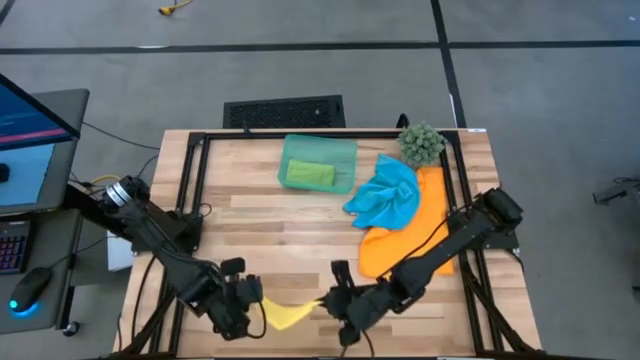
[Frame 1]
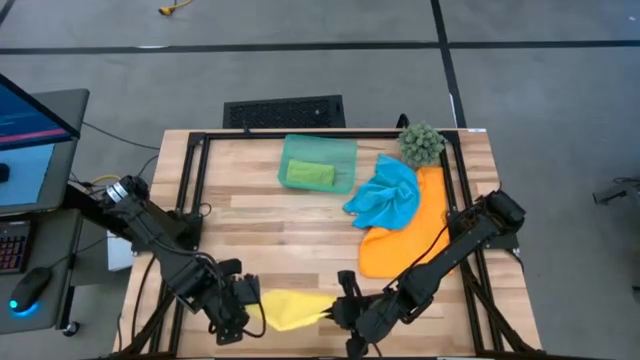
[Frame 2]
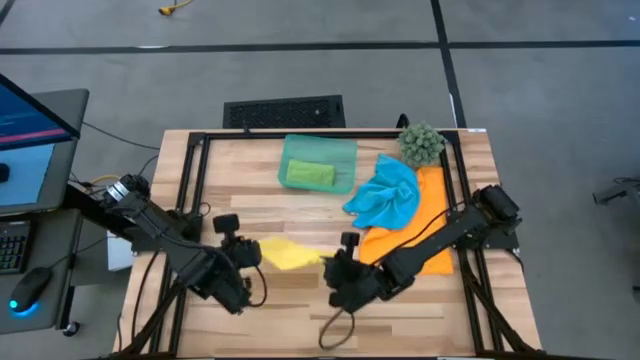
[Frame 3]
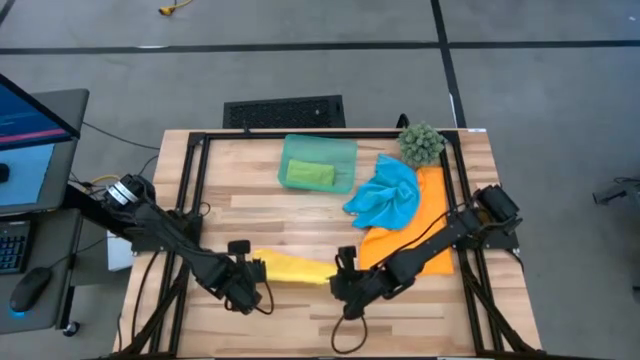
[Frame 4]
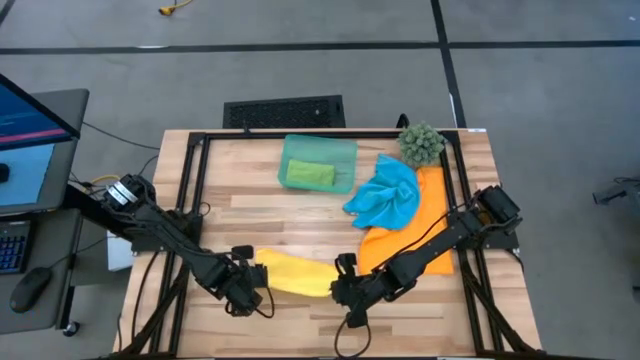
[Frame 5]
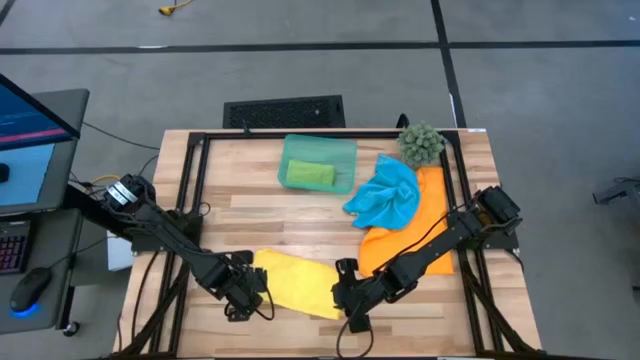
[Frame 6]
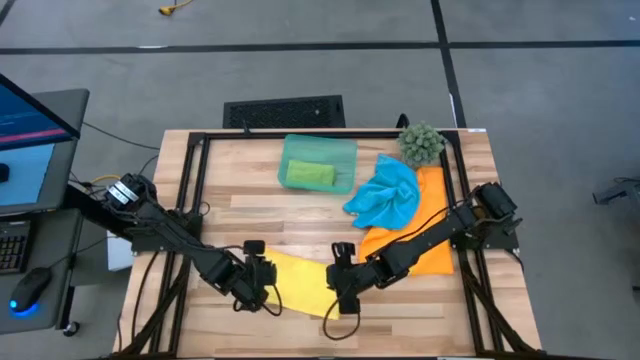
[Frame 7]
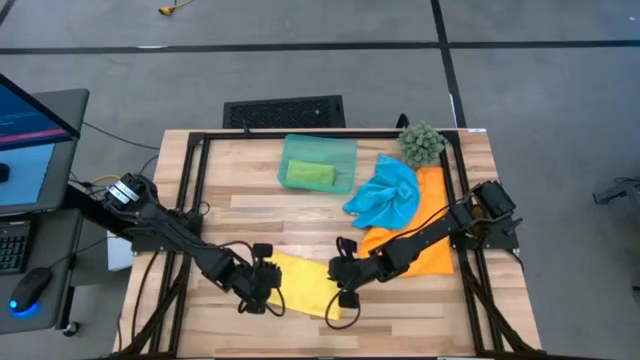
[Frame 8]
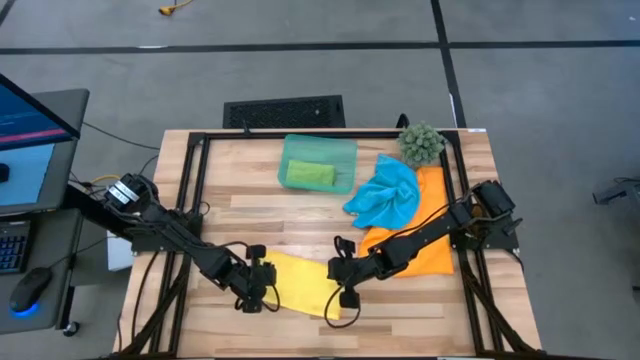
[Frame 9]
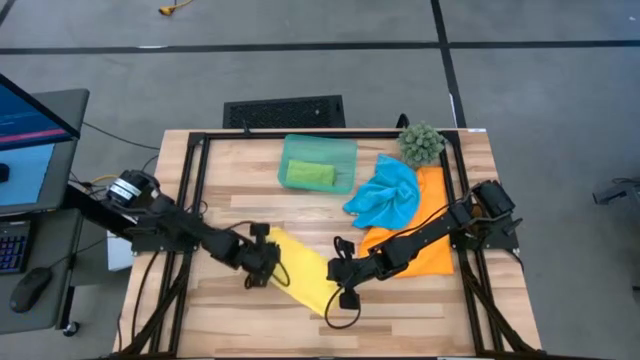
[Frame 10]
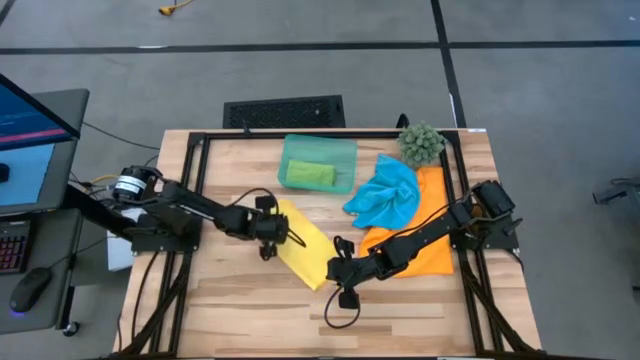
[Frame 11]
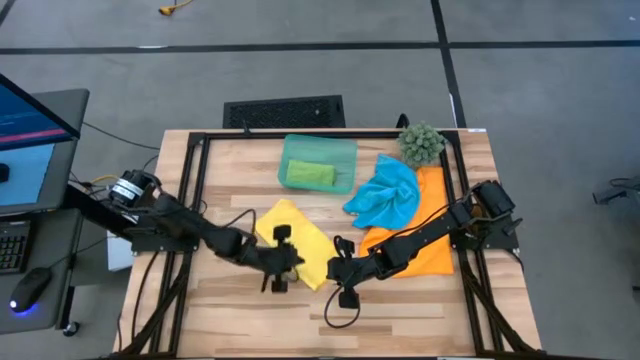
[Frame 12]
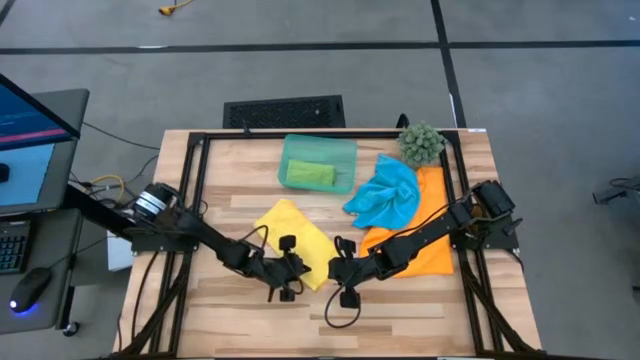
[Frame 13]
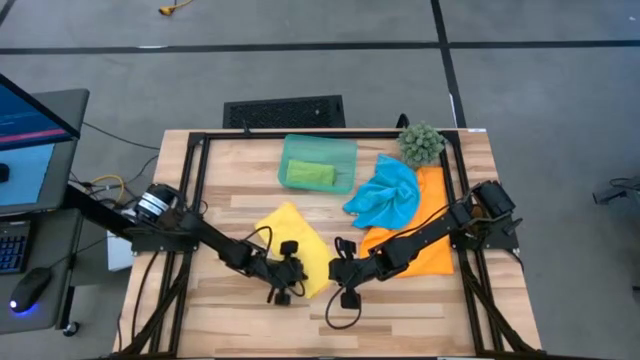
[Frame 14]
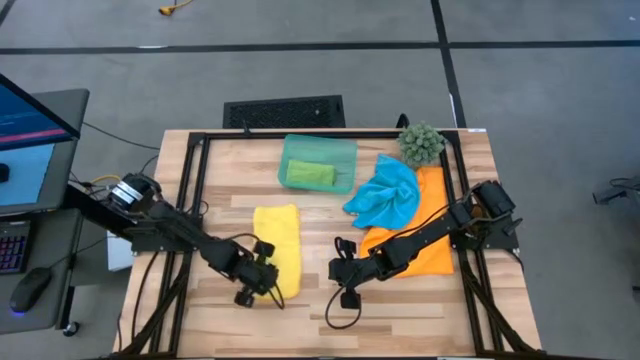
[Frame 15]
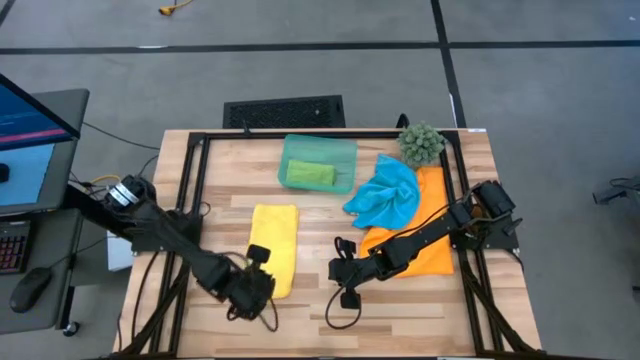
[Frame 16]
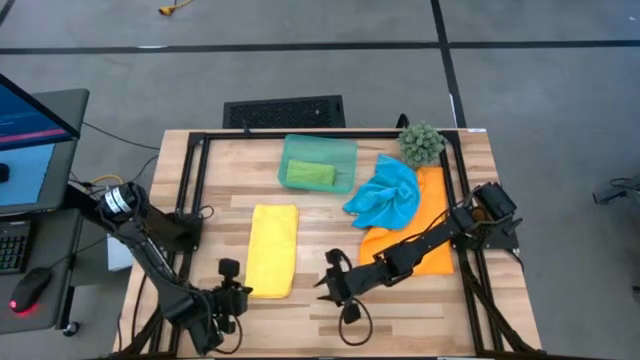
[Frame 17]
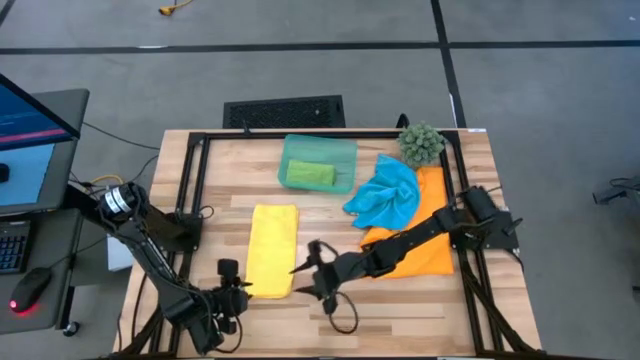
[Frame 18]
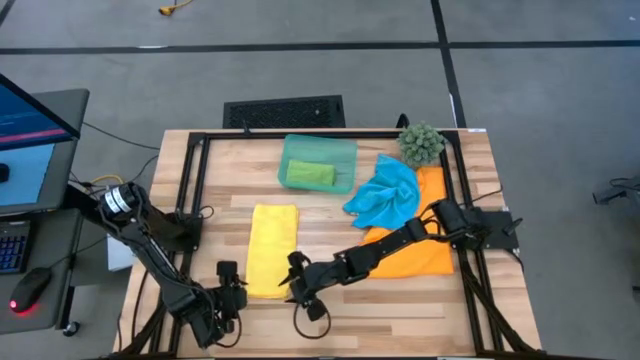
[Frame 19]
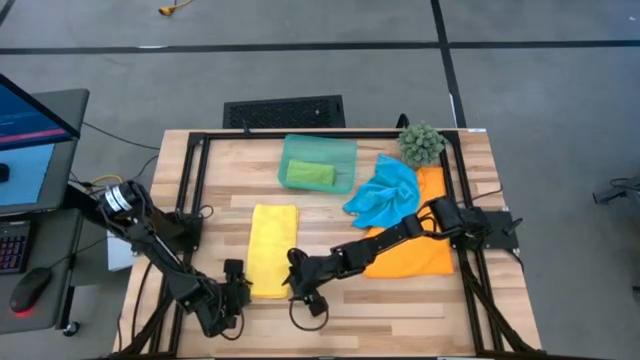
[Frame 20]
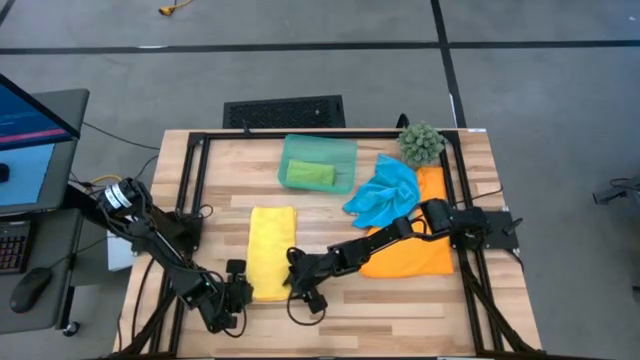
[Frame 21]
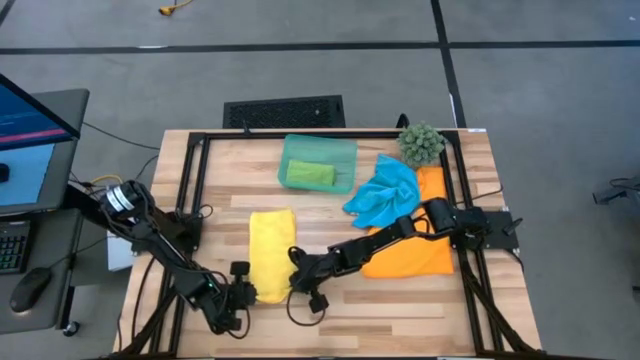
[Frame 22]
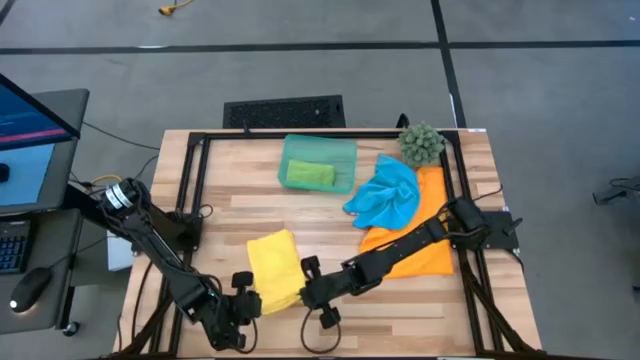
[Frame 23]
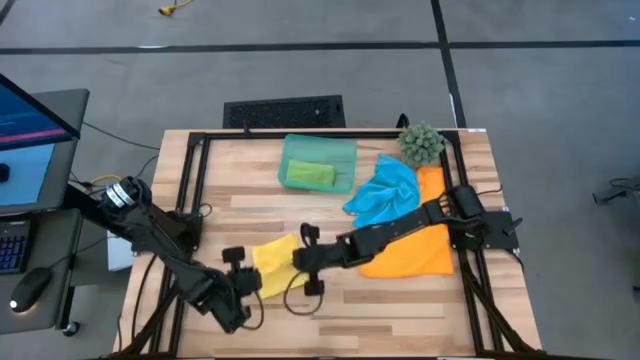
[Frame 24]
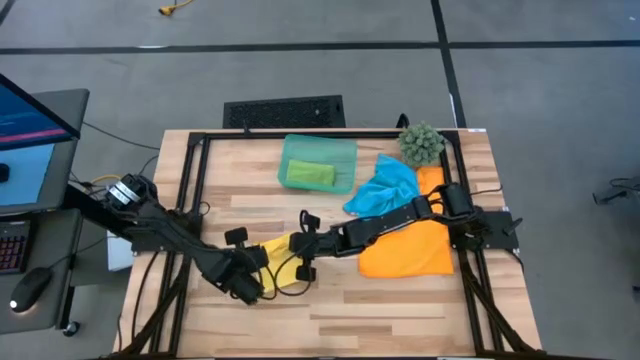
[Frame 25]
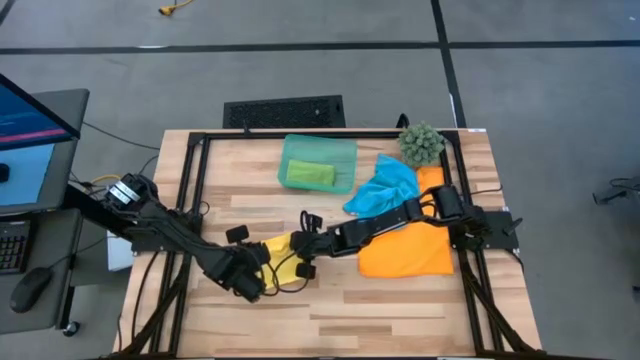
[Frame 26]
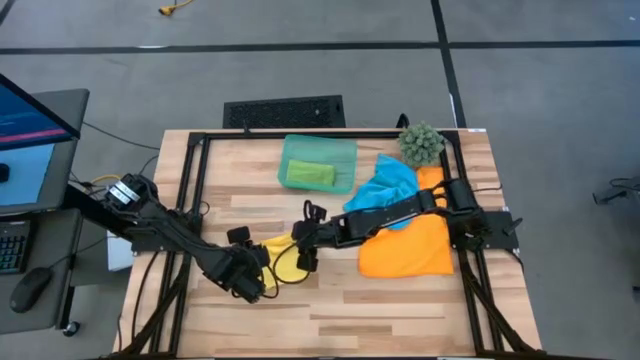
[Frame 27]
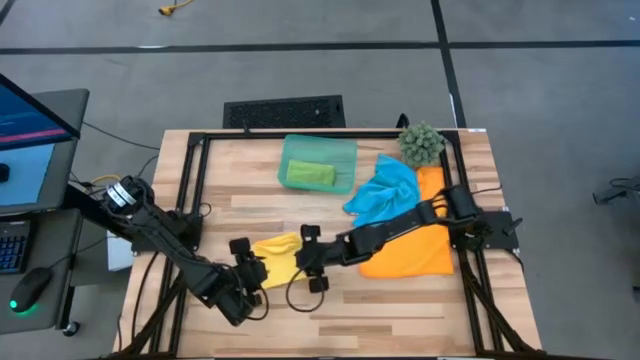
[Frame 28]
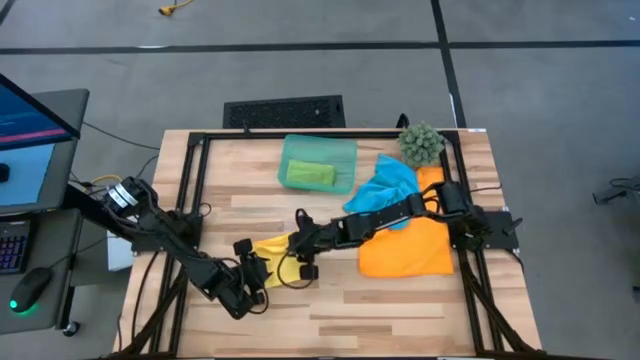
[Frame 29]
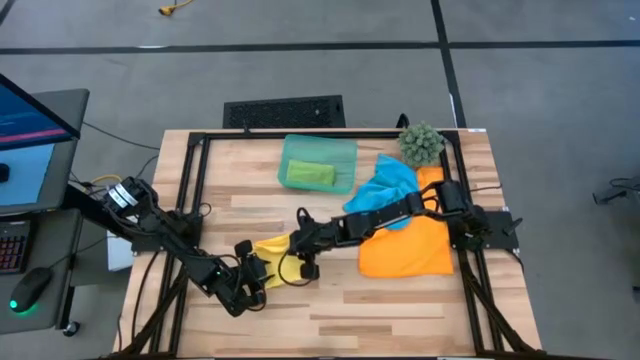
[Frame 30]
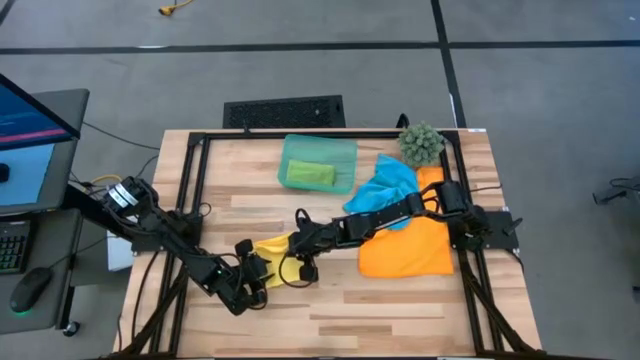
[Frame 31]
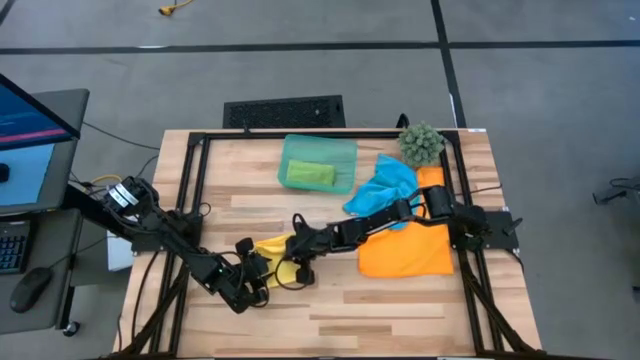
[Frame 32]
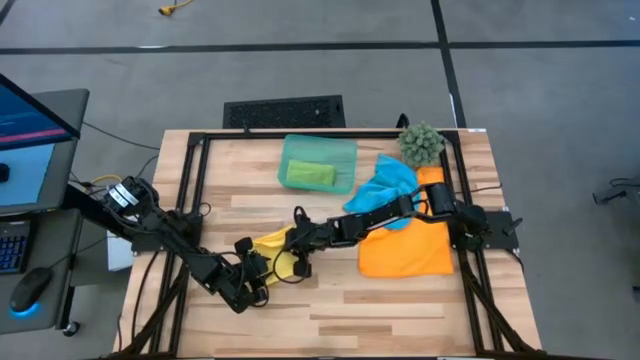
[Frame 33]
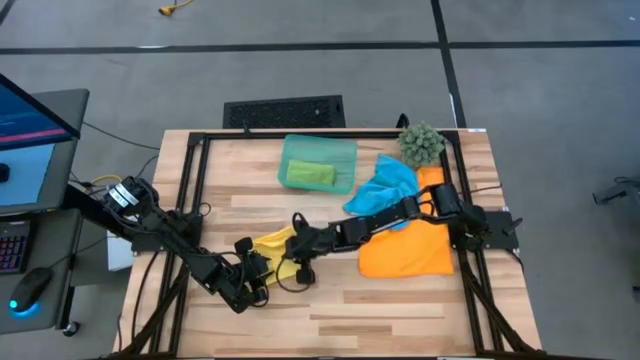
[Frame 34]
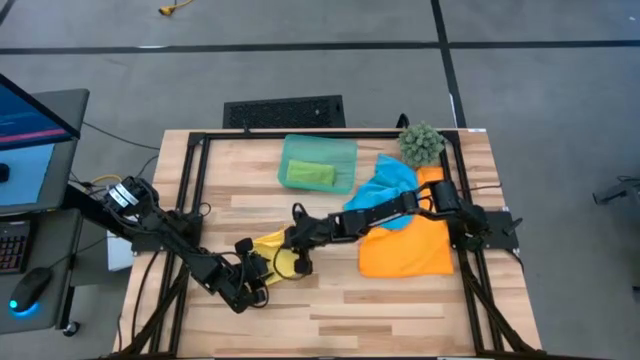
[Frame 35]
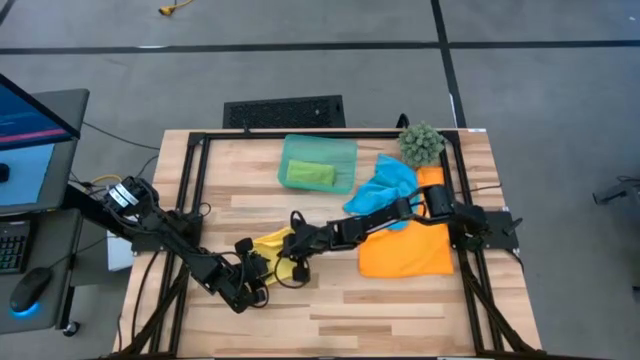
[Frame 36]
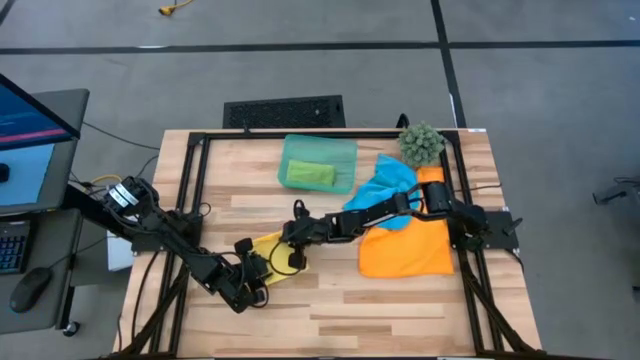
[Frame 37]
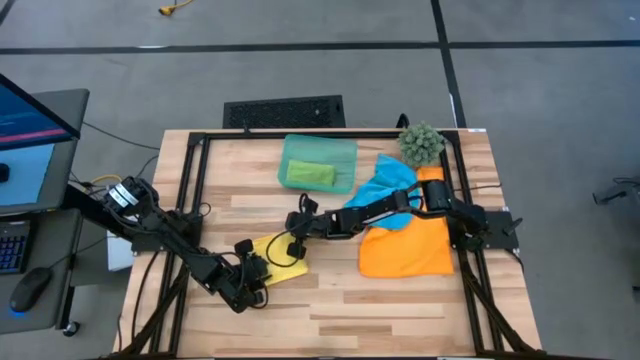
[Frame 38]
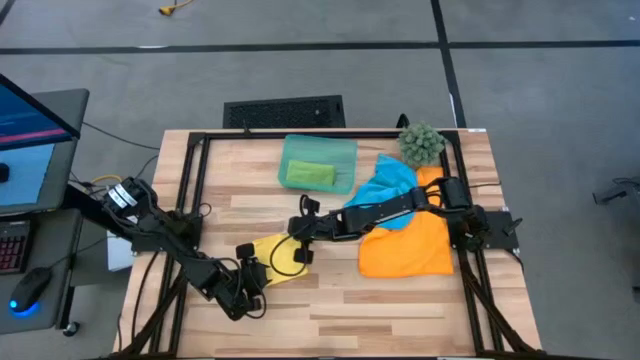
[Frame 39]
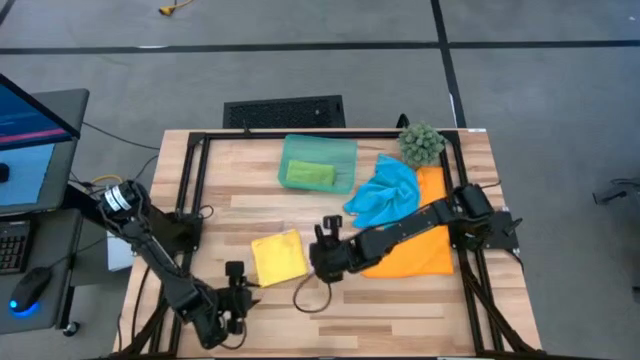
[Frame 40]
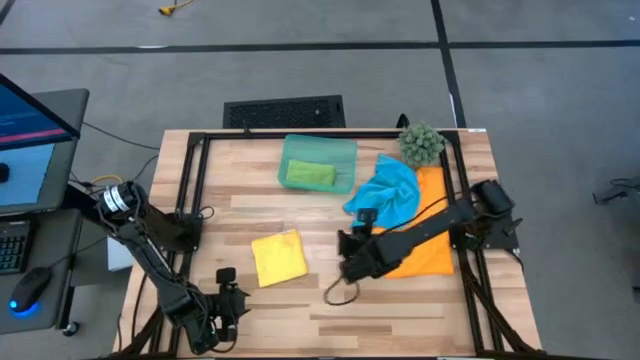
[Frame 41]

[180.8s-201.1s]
Task: Roll microfiber towels into tight, uniform cylinder then place into a basket
Roll the yellow microfiber cloth
